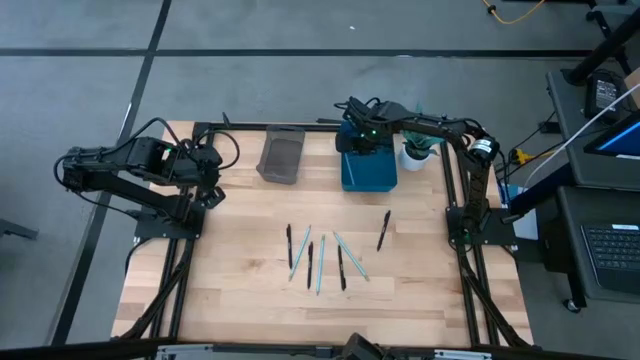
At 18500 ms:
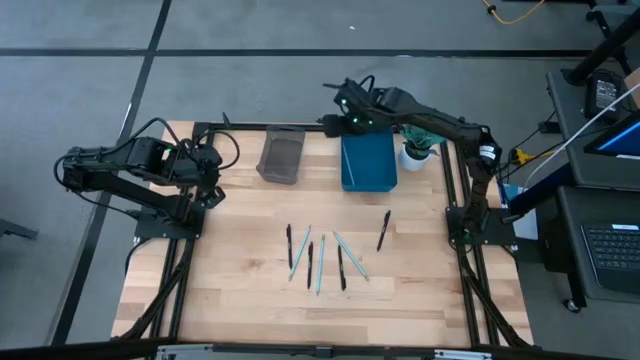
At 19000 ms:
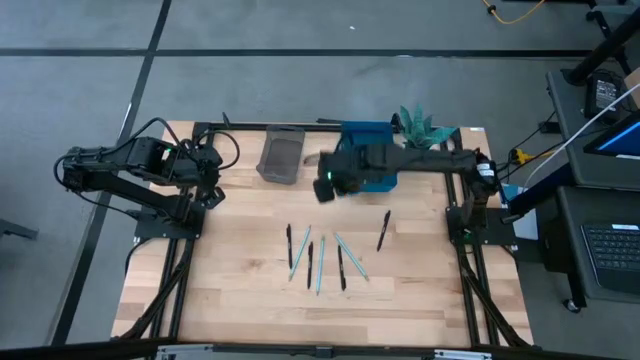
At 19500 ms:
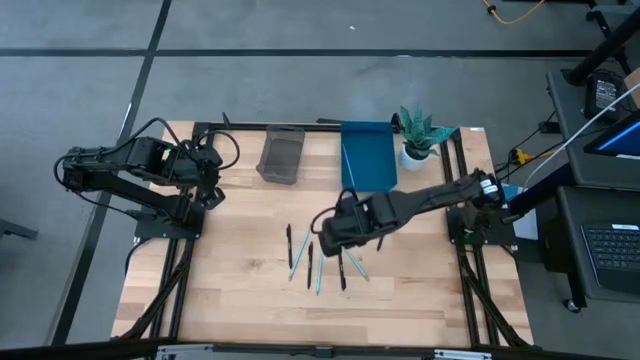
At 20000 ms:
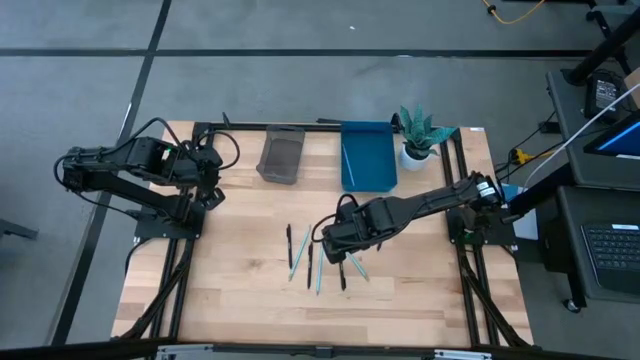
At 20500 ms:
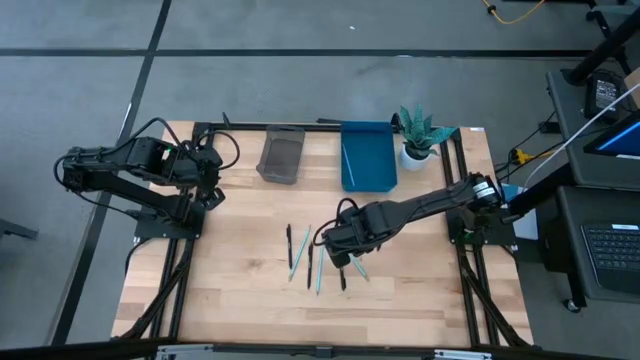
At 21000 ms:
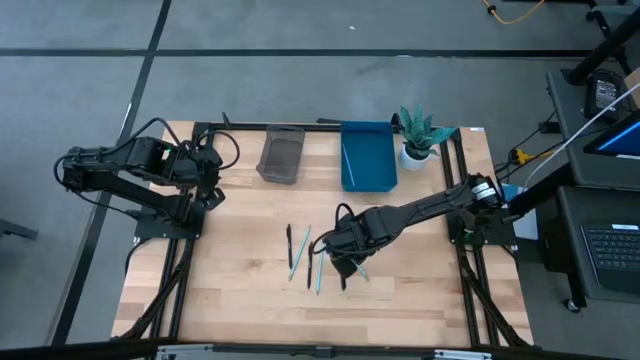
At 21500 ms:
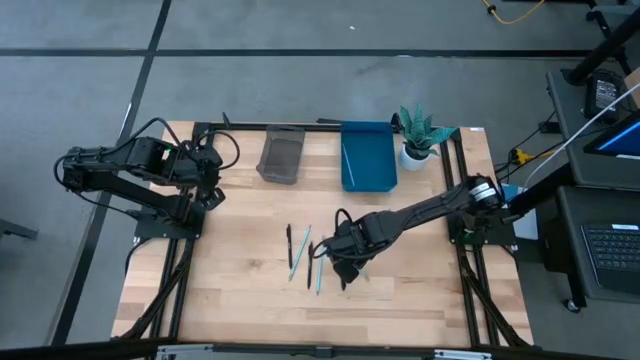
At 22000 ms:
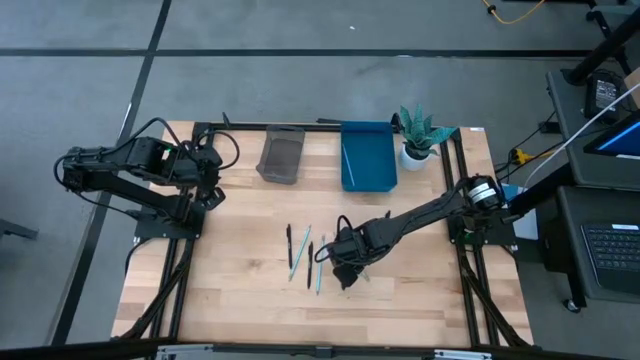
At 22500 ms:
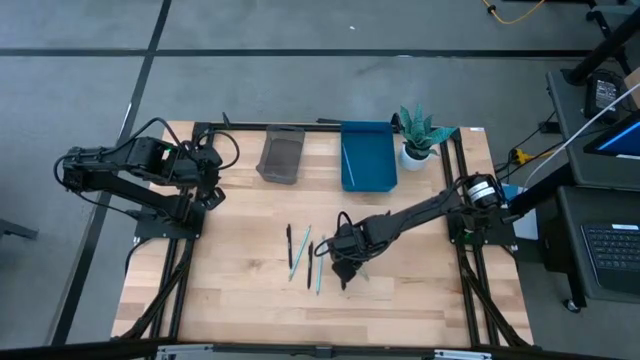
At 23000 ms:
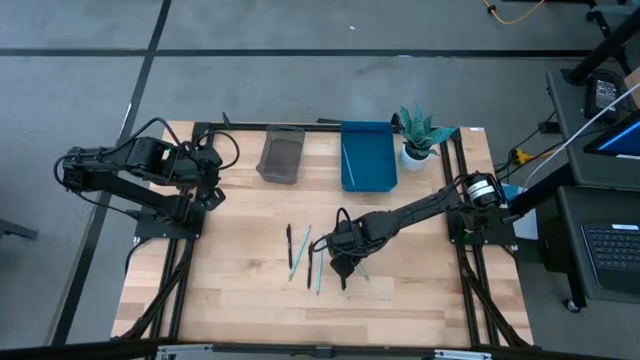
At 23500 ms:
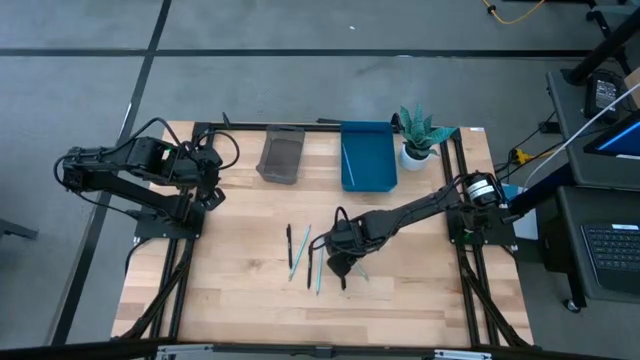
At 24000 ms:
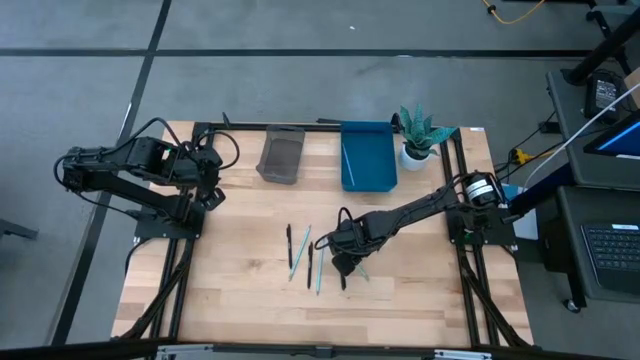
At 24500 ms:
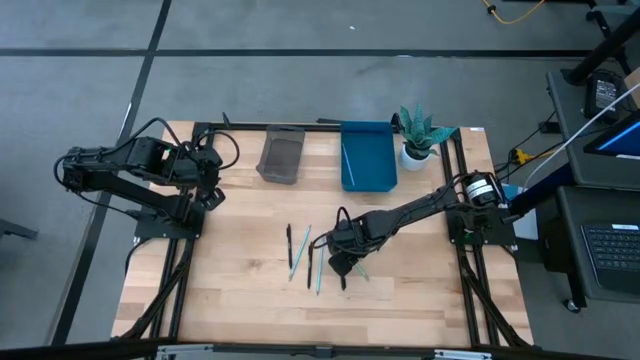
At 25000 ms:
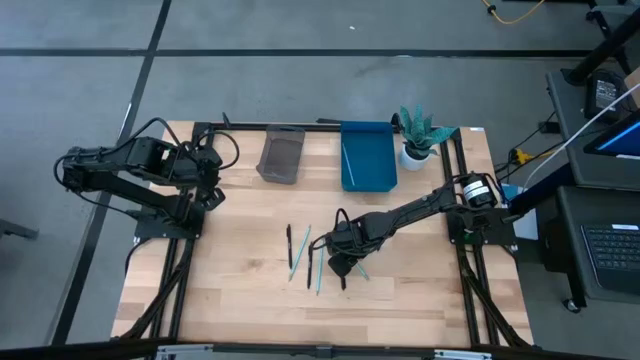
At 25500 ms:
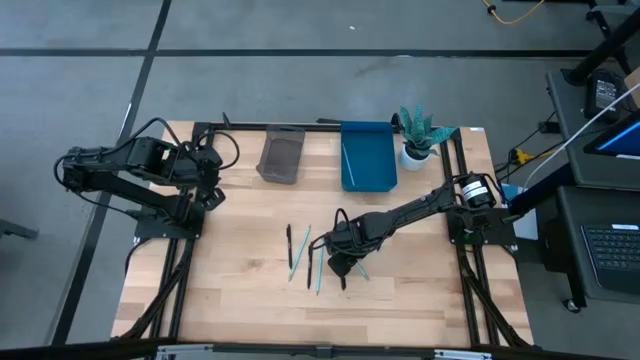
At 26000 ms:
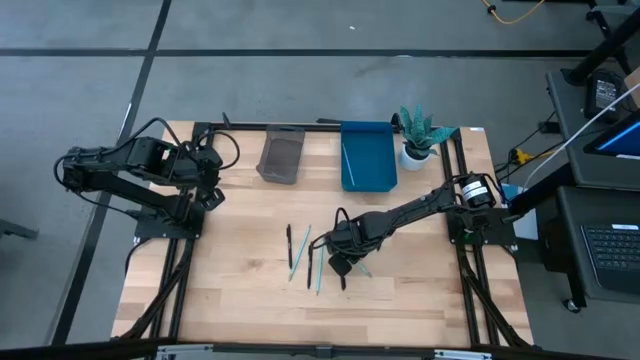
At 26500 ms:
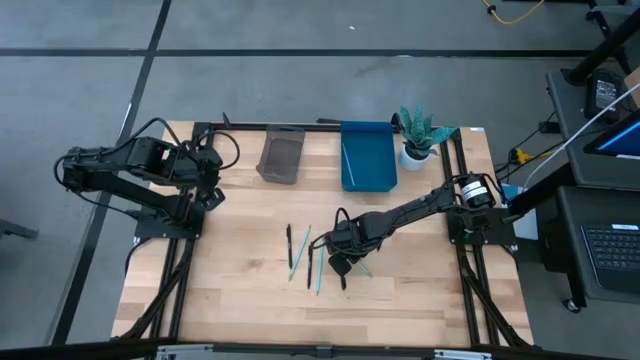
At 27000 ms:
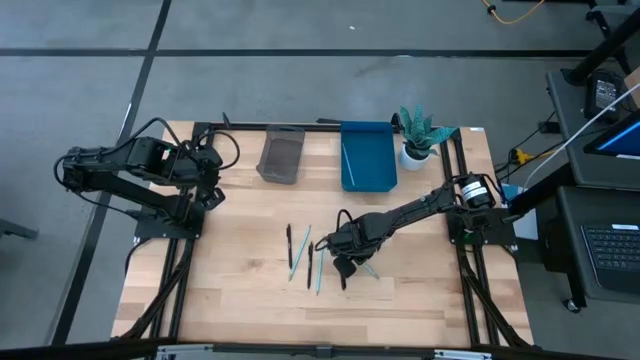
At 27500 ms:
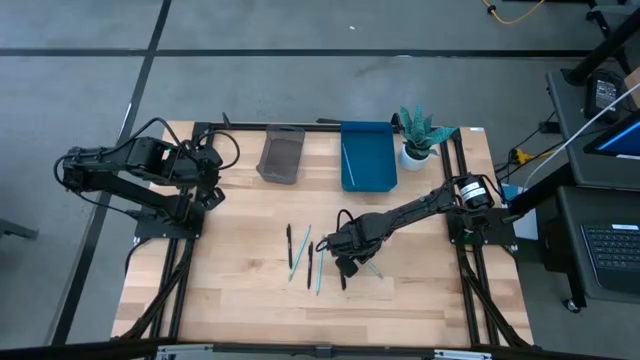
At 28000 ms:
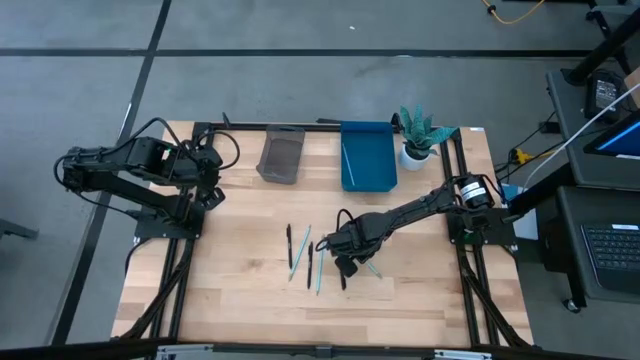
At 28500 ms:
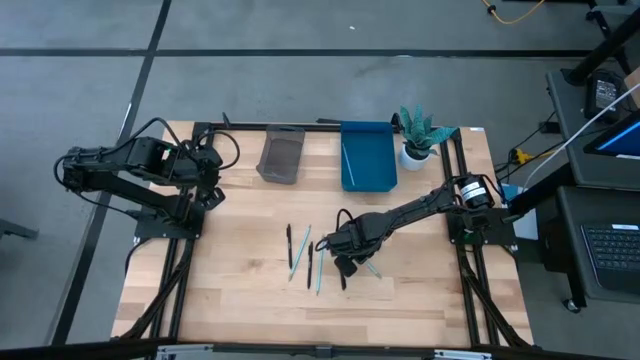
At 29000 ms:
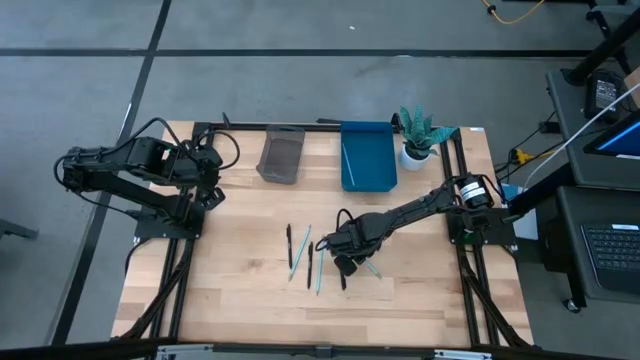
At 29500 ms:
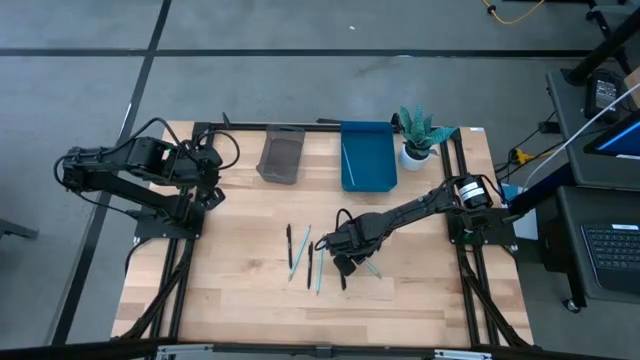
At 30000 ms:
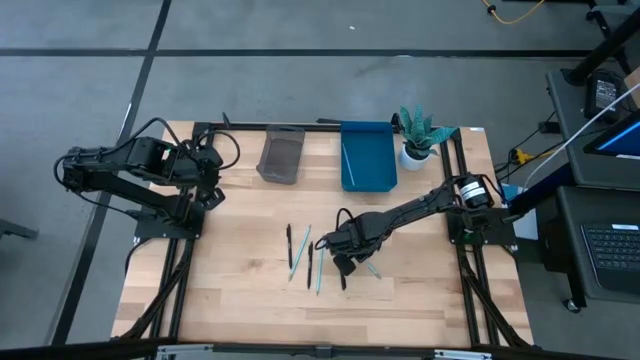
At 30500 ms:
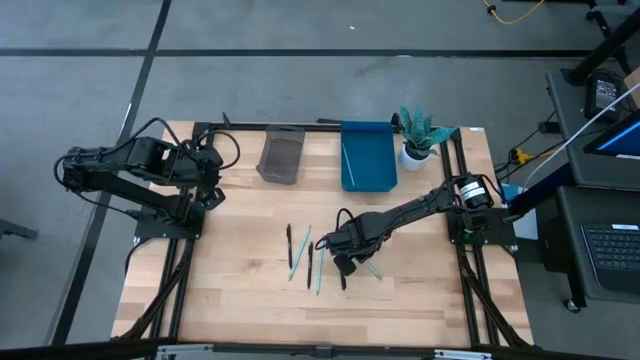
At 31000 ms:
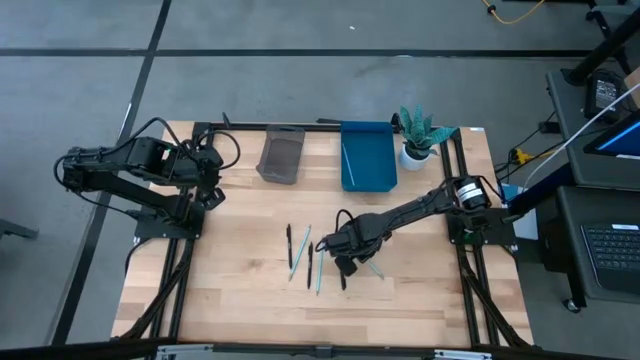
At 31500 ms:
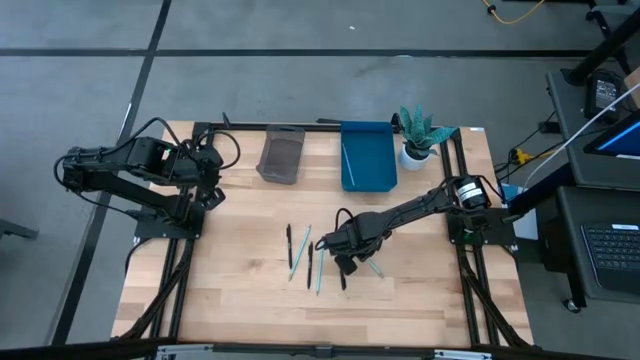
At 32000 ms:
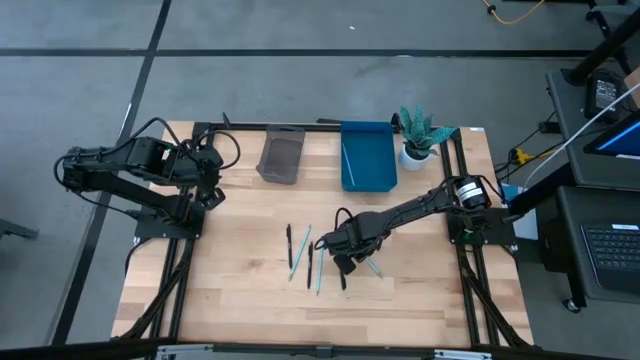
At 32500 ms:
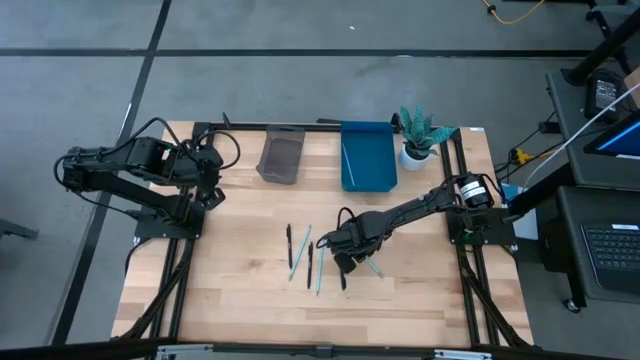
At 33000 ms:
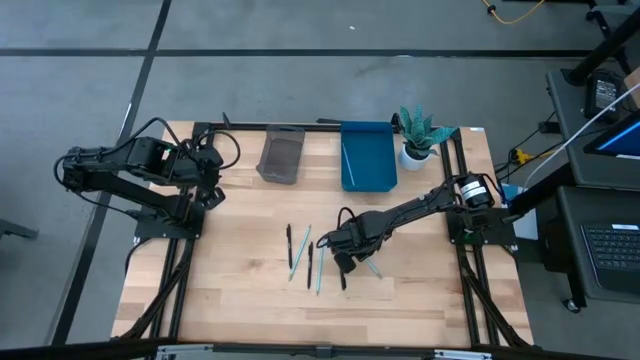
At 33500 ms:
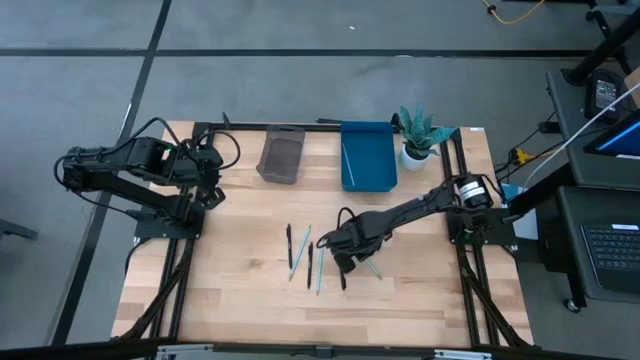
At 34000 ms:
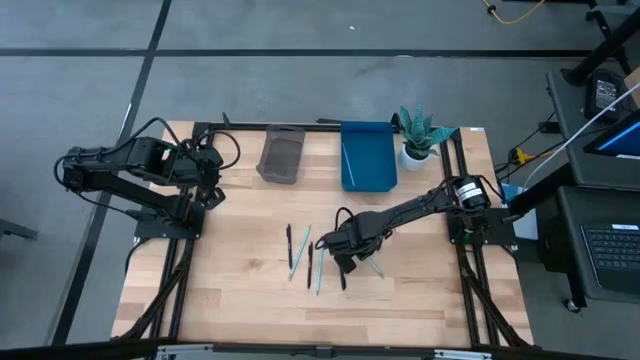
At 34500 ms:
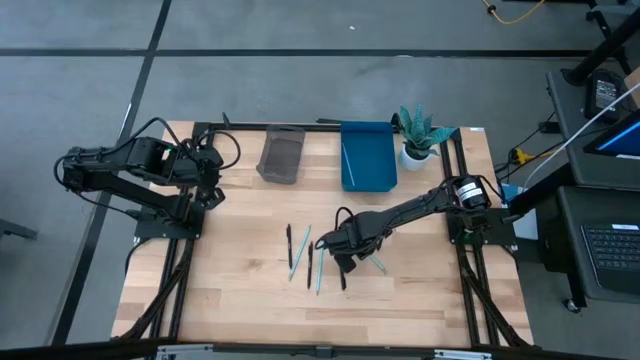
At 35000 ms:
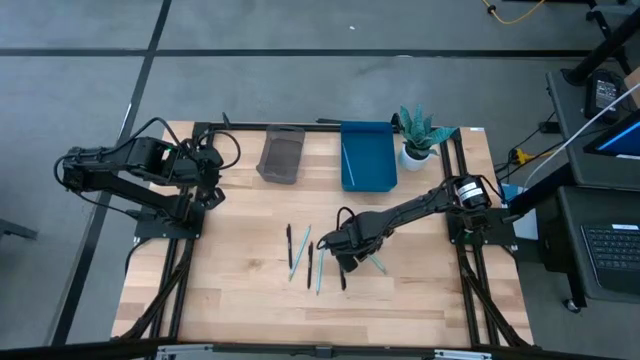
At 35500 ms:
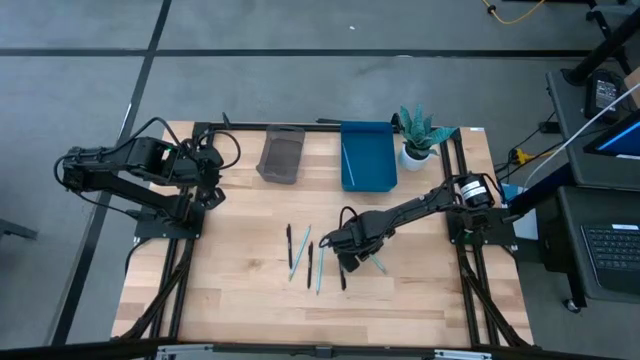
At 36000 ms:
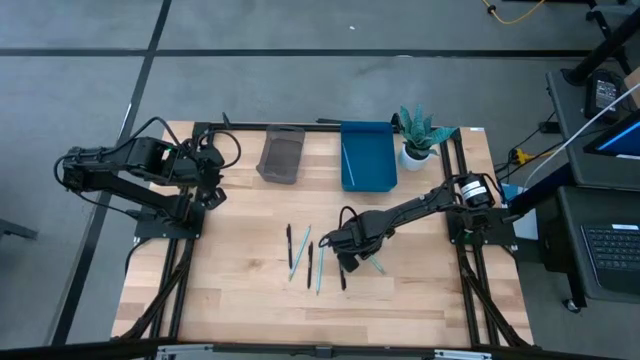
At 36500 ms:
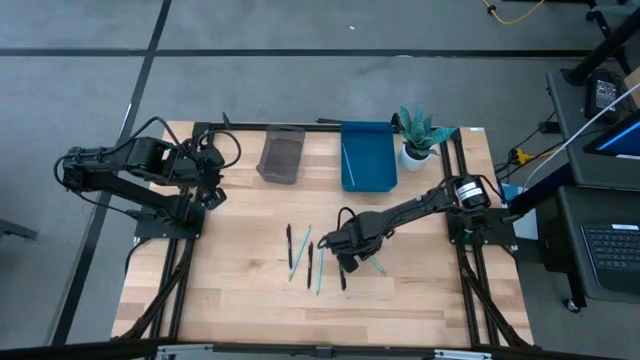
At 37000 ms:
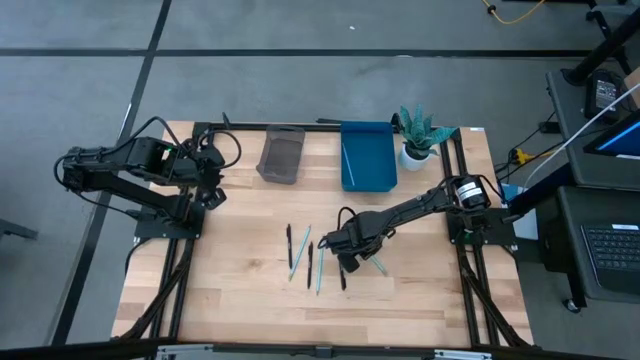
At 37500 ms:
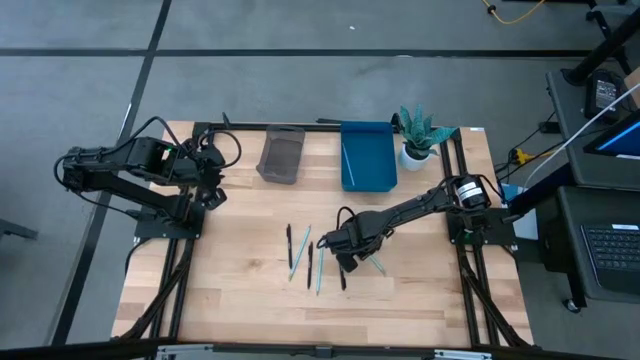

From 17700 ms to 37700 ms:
Task: Sort pens & pencils
Put the right light blue pencil into the blue bin
